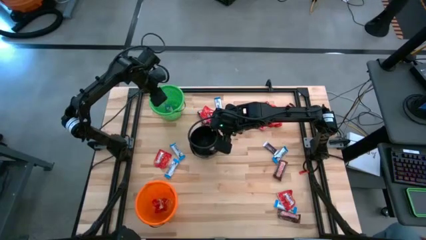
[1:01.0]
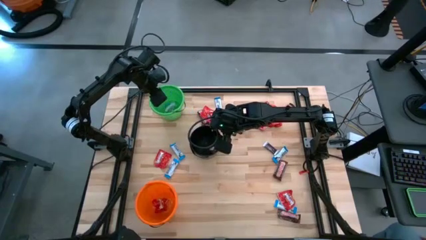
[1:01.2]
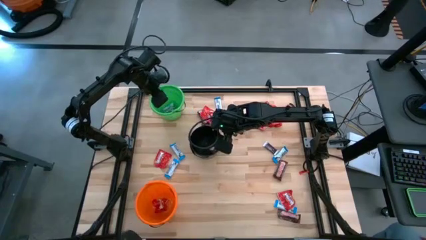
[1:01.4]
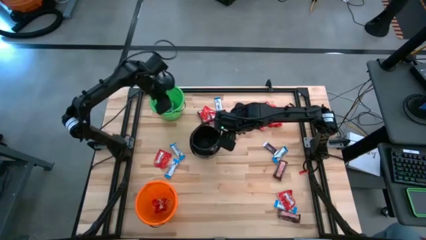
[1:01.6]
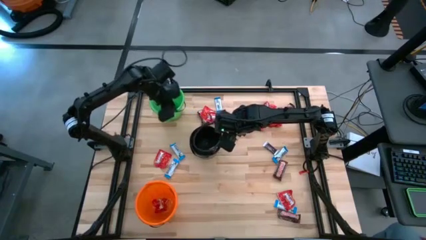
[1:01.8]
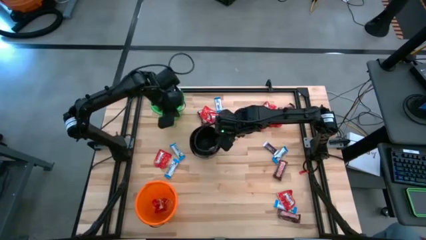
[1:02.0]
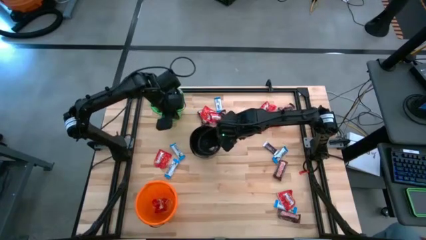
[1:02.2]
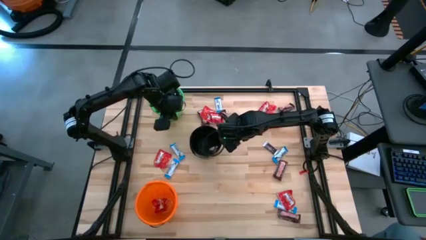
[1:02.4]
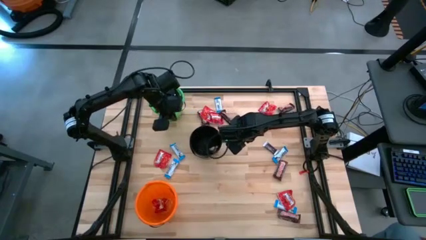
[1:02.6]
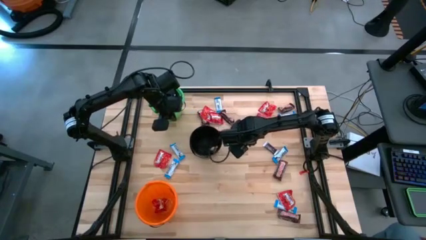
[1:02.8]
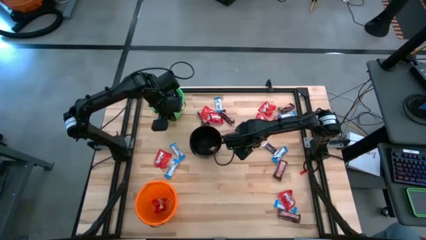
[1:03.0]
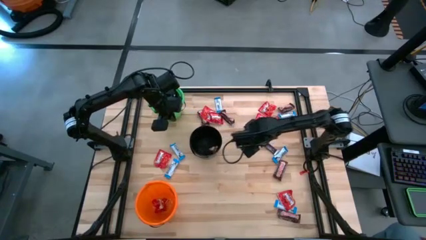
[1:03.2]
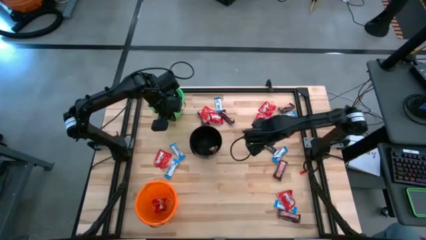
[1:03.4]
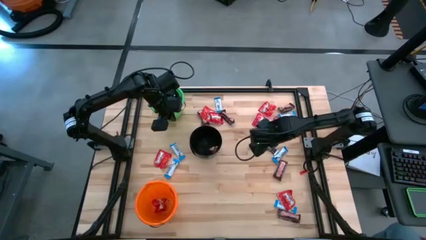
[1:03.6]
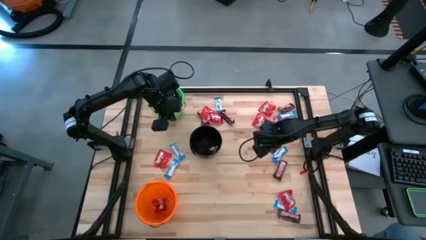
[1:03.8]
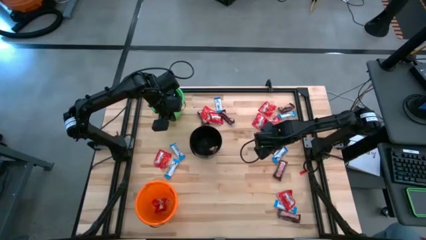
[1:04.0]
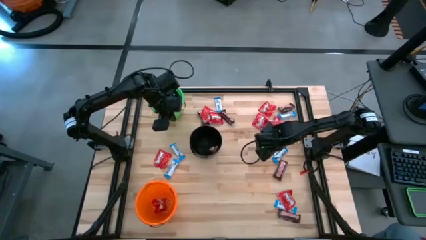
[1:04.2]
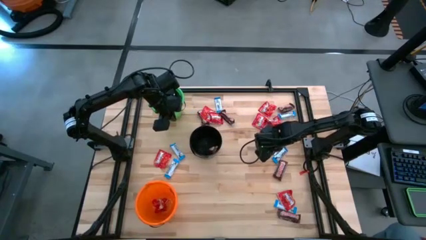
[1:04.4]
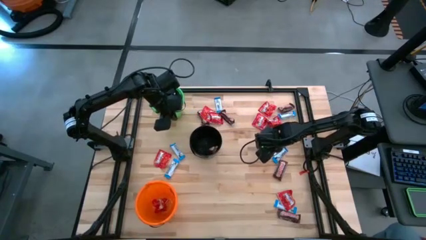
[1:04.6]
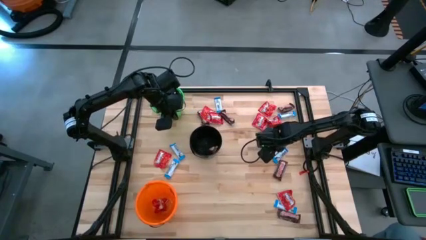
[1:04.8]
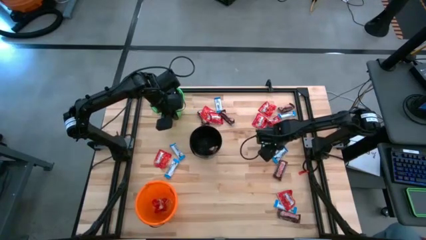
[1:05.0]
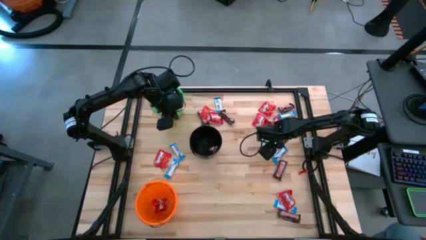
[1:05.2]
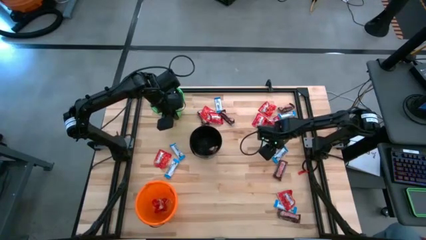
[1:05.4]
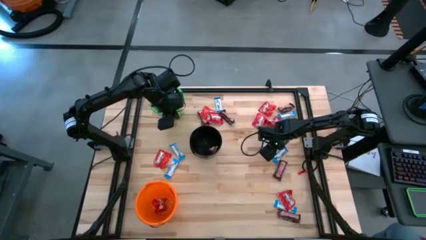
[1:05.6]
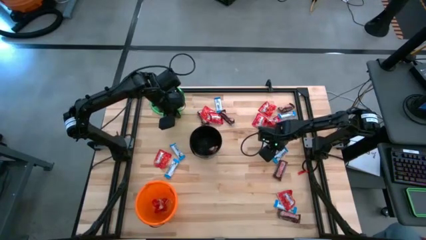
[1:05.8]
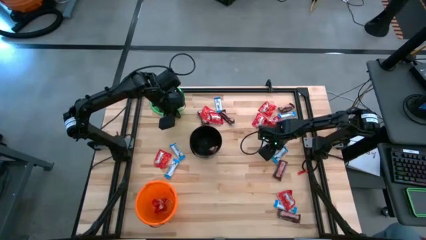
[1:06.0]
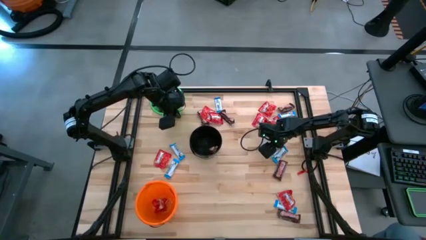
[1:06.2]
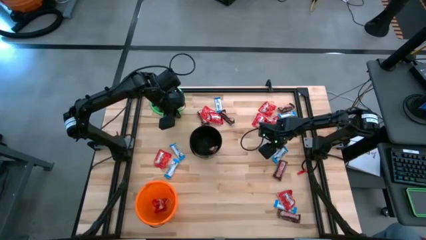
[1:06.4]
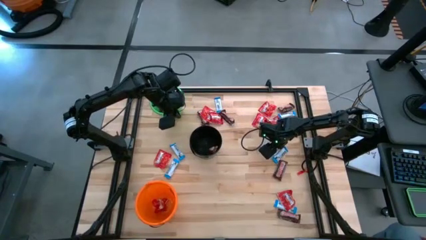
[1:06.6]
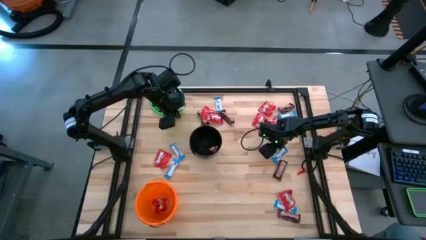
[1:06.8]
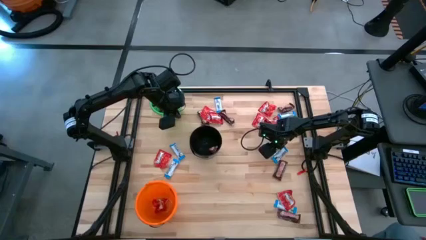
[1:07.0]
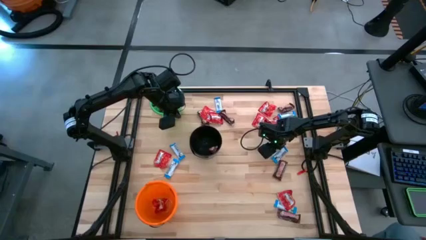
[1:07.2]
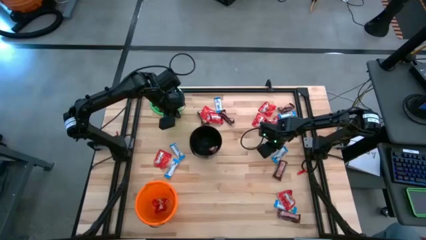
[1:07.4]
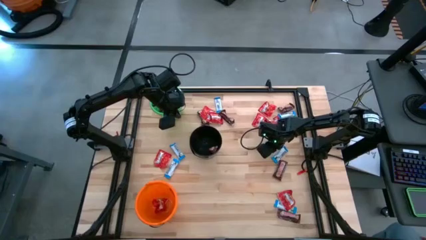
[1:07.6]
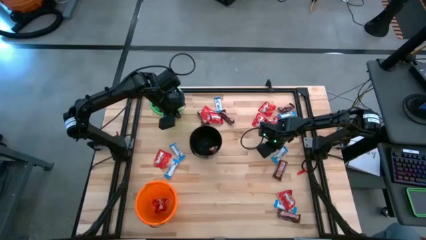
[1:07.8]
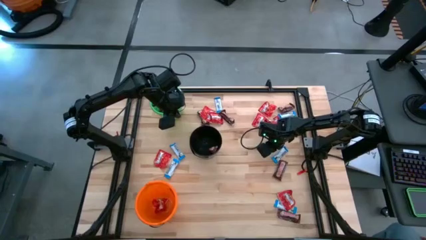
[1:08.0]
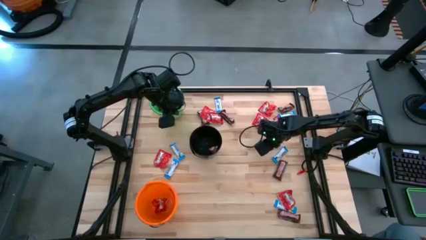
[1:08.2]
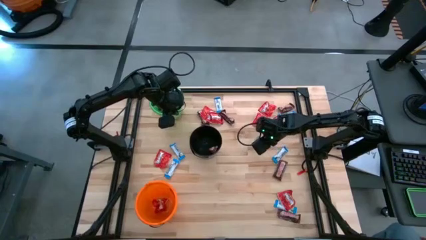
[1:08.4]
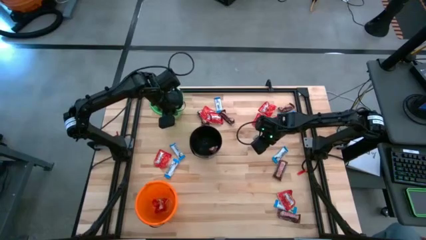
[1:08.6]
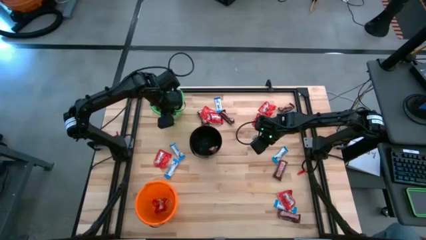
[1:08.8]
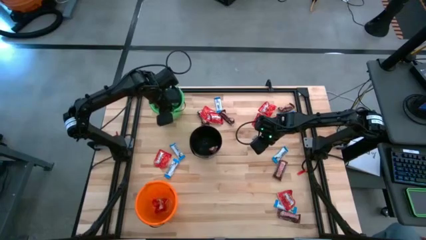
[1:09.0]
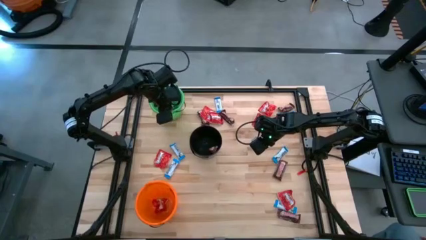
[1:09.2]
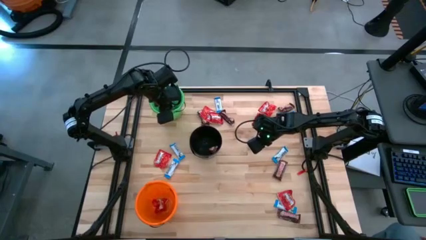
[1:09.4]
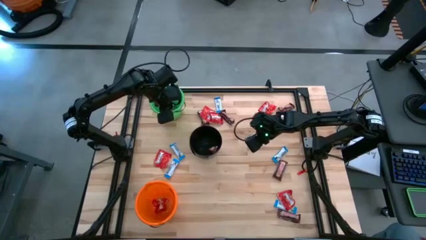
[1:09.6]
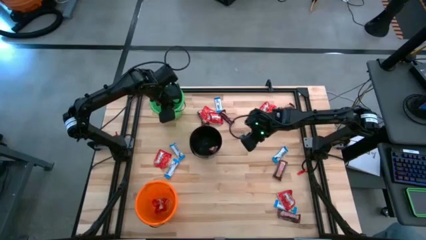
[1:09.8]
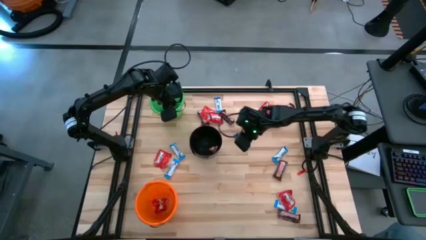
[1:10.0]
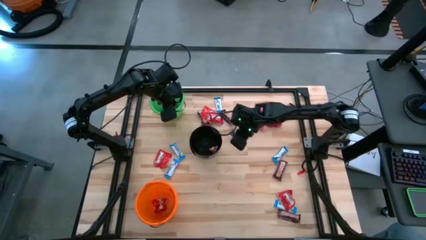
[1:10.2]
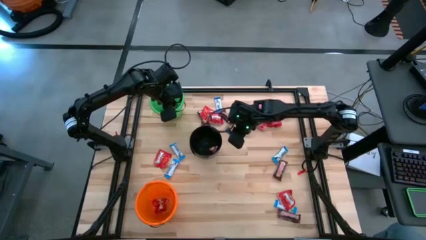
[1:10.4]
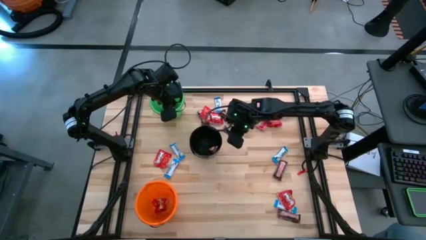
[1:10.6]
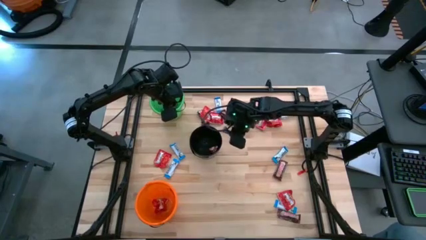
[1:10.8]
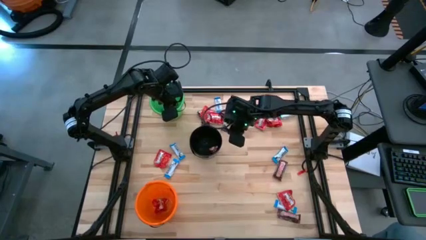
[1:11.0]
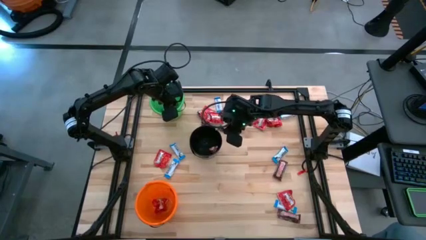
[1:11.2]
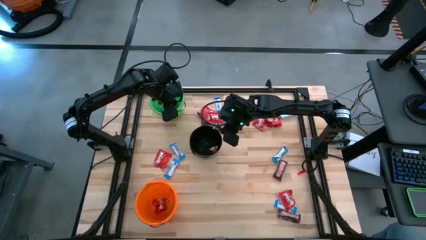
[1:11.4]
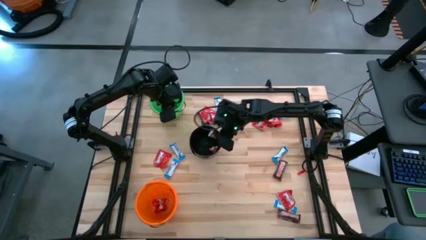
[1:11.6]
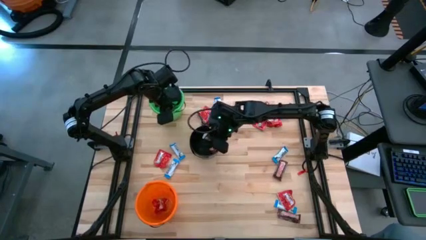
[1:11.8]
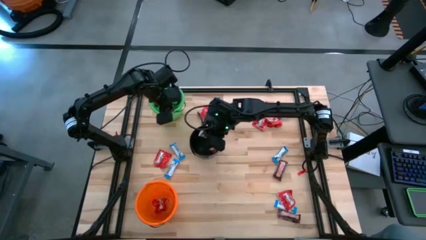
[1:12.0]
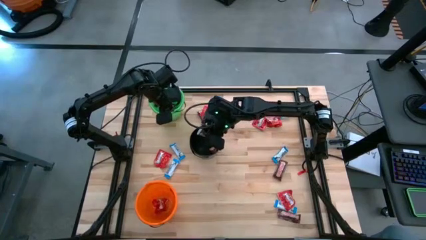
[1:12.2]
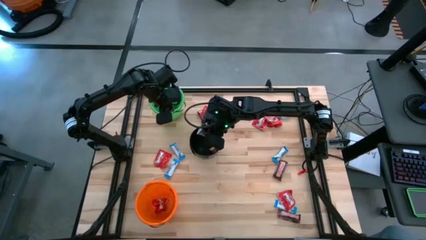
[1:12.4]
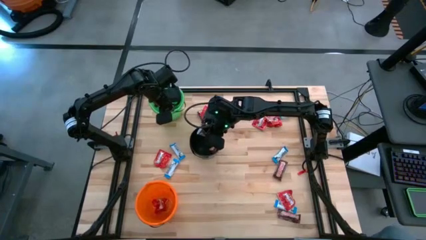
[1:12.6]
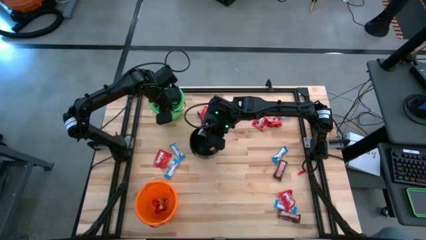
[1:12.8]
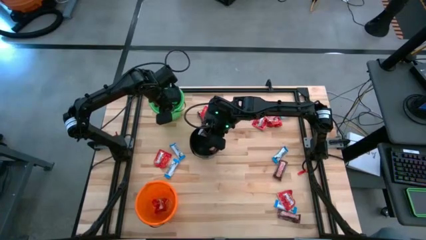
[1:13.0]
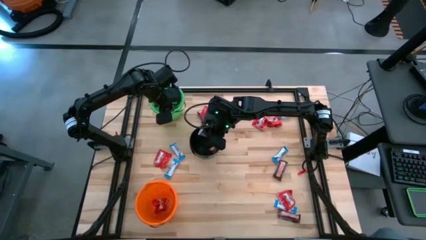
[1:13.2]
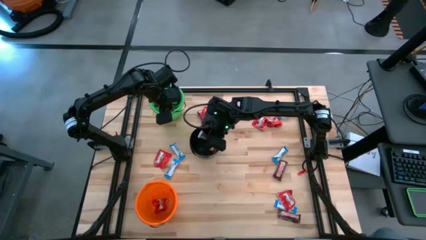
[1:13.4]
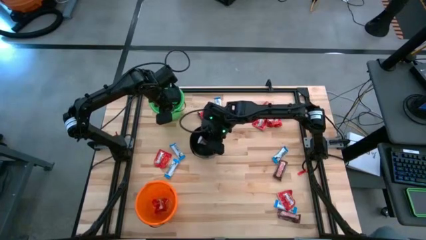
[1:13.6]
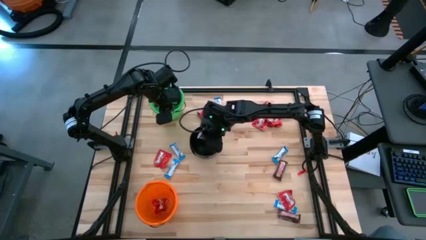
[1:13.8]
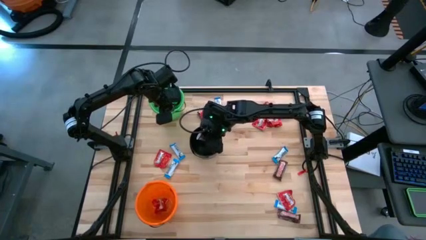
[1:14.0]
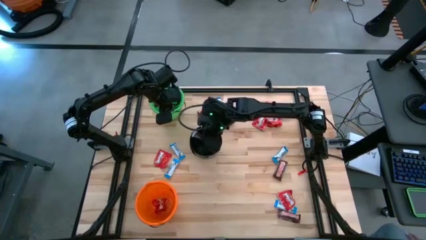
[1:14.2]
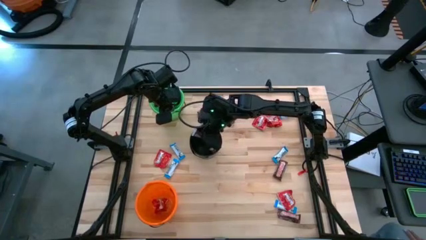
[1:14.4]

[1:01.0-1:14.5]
Task: Sort candy
Put the brown and silver chocolate into the black bucket

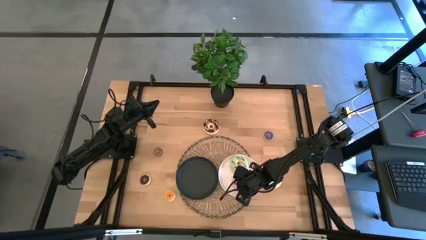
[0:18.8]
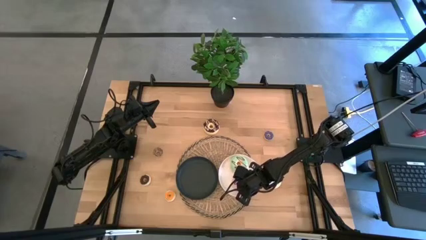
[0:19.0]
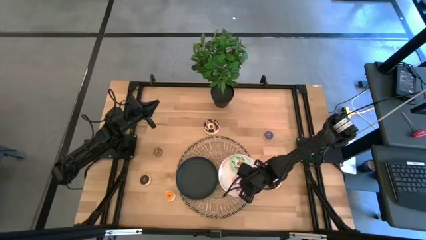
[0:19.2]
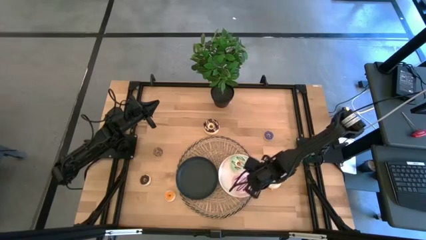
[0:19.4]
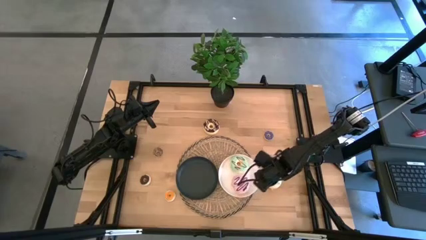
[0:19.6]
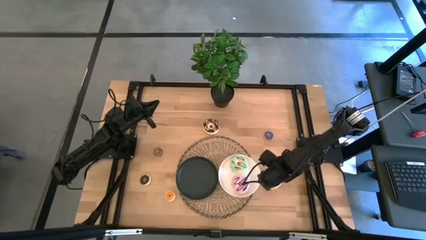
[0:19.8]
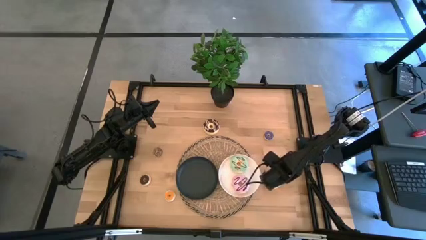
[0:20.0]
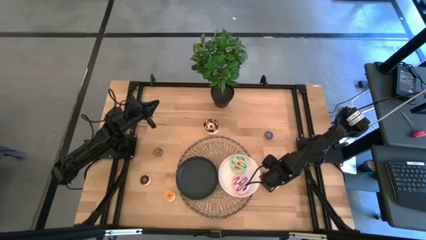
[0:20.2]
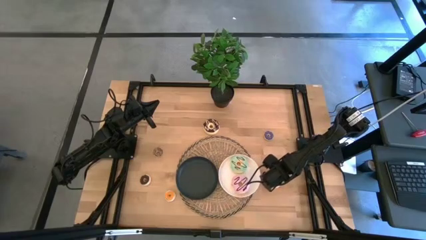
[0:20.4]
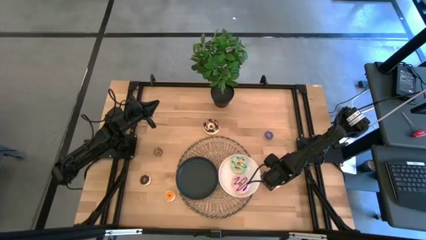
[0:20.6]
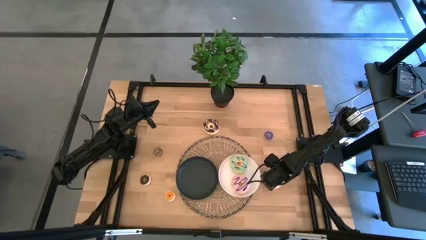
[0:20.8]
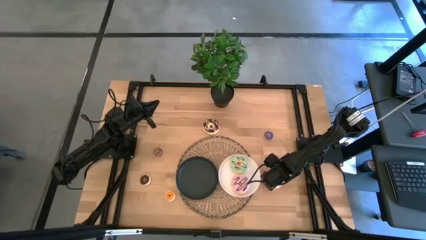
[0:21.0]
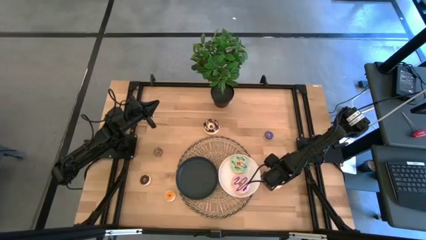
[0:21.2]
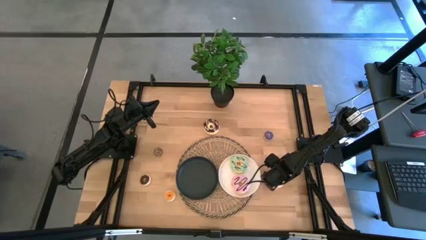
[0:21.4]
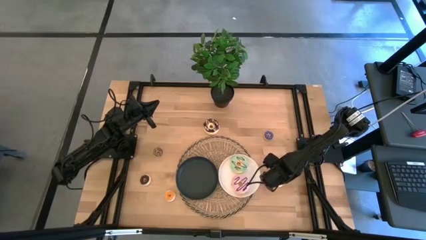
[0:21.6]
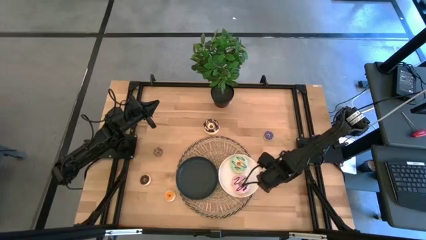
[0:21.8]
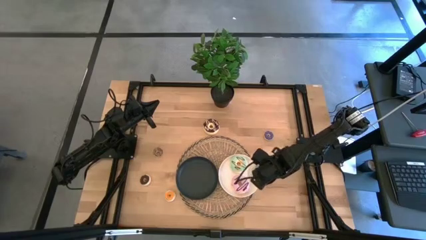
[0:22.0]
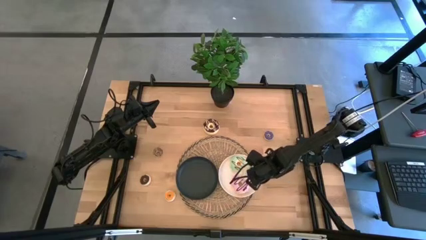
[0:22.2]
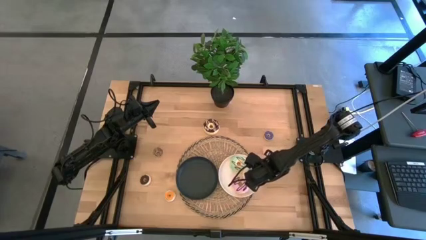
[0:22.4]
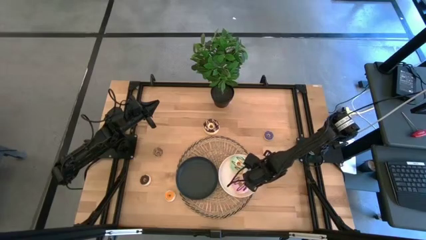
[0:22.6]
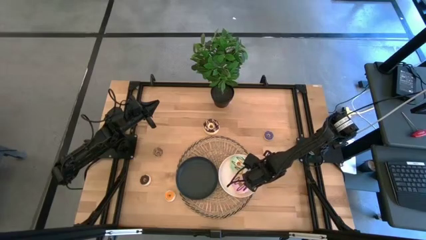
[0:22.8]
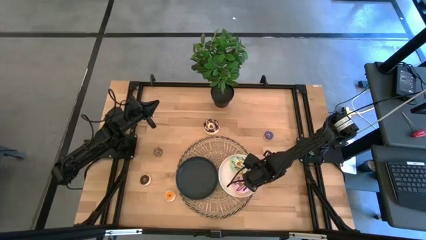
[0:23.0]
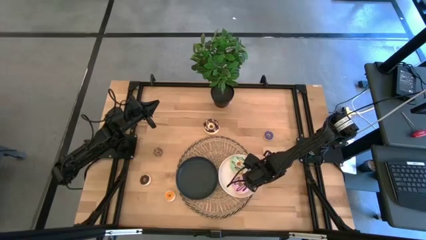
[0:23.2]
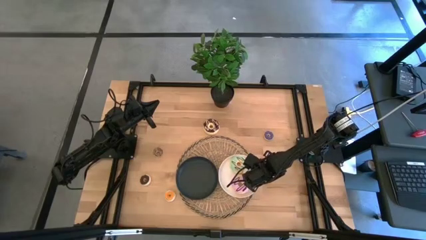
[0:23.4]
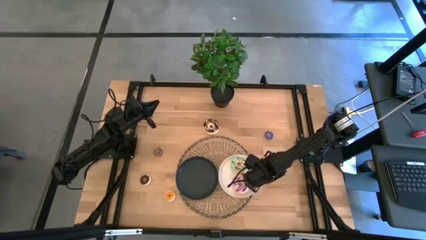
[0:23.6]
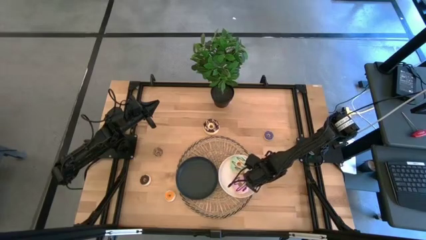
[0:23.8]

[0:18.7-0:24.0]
Task: Pick & Place donuts
Put the large white donut on the white plate
